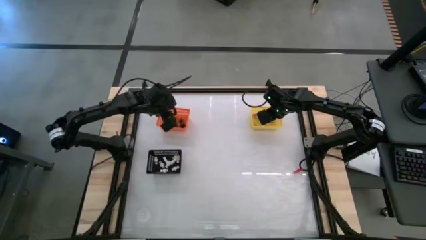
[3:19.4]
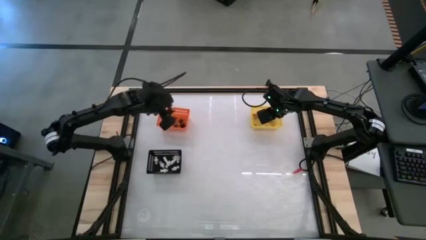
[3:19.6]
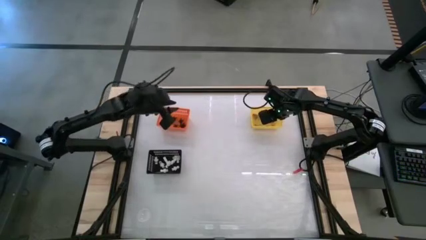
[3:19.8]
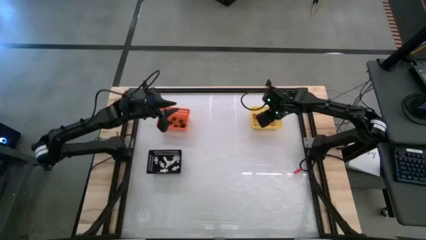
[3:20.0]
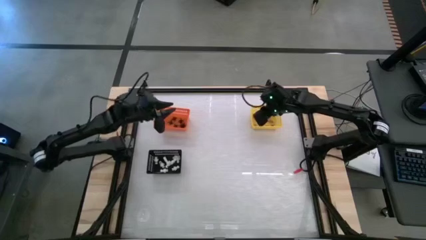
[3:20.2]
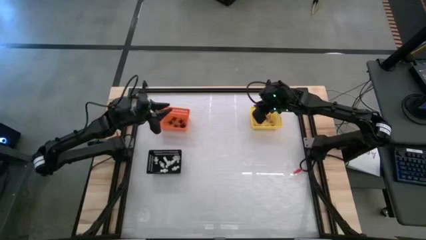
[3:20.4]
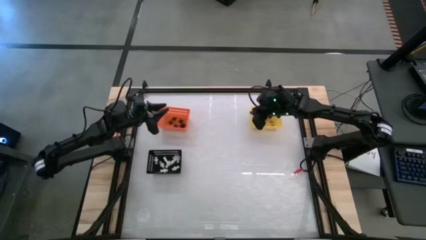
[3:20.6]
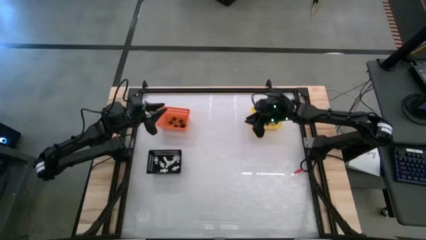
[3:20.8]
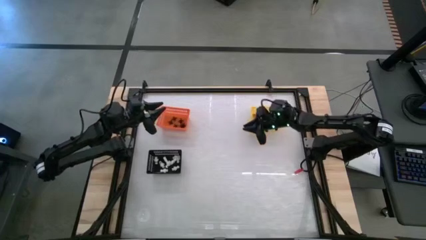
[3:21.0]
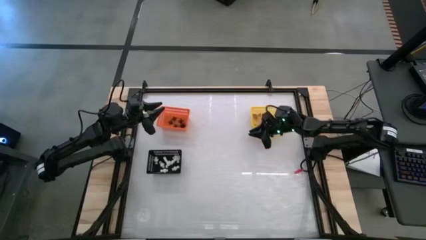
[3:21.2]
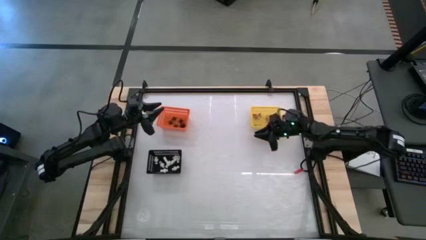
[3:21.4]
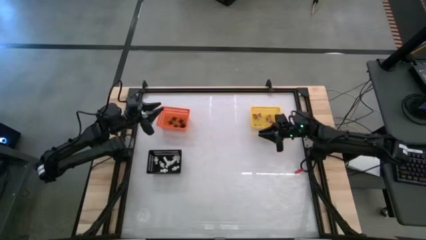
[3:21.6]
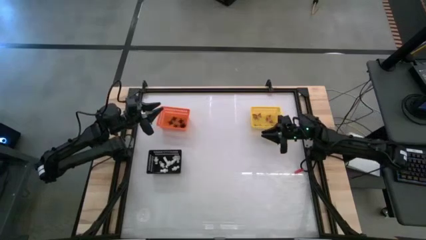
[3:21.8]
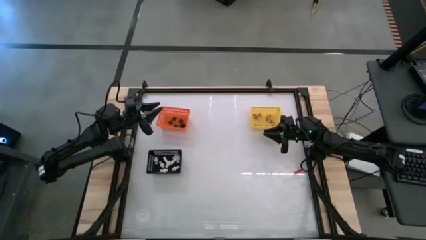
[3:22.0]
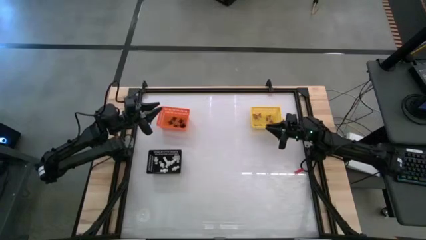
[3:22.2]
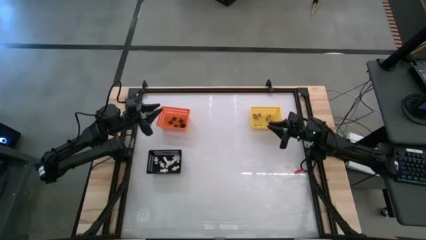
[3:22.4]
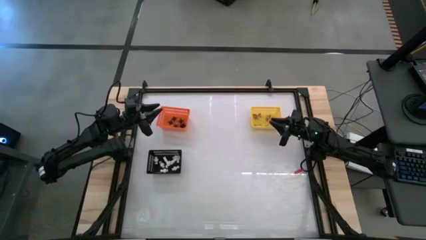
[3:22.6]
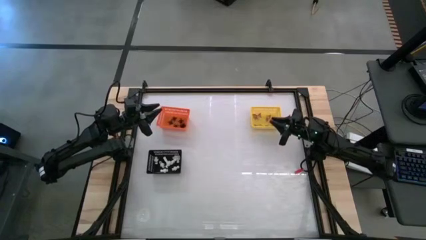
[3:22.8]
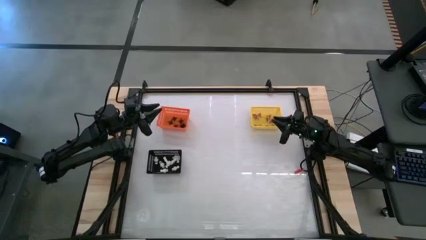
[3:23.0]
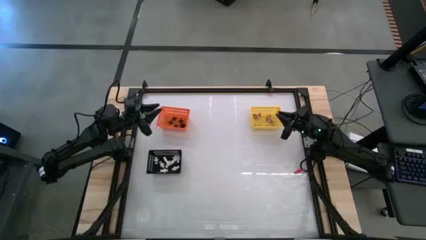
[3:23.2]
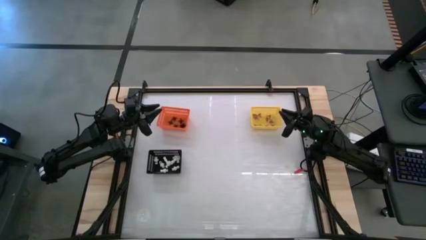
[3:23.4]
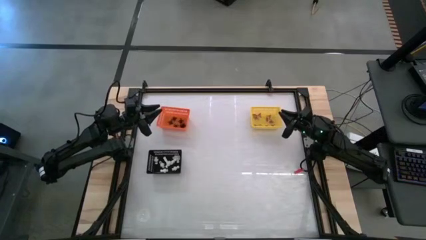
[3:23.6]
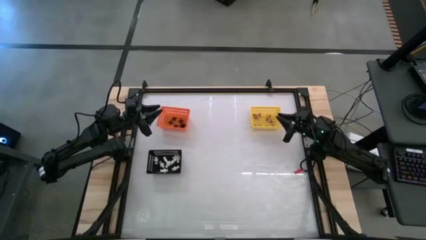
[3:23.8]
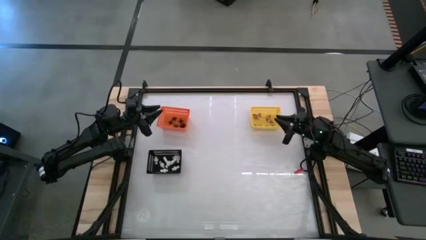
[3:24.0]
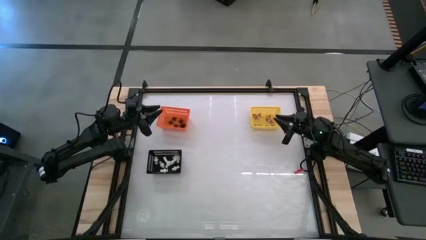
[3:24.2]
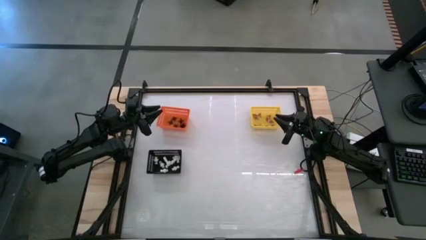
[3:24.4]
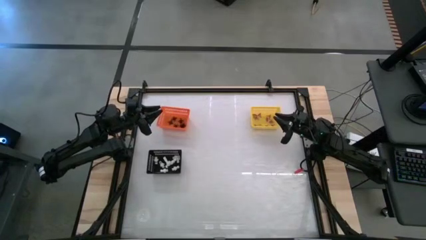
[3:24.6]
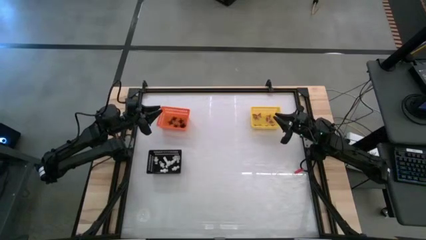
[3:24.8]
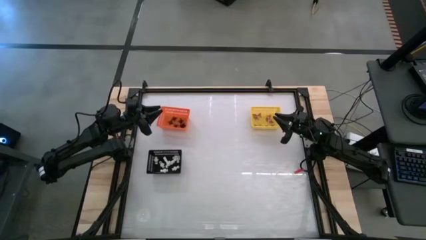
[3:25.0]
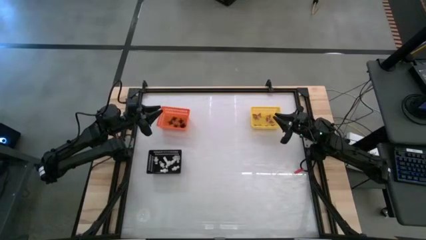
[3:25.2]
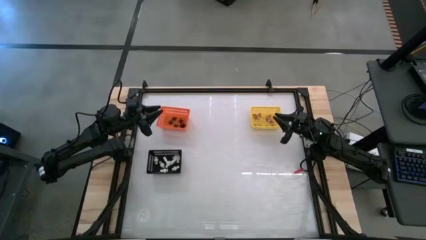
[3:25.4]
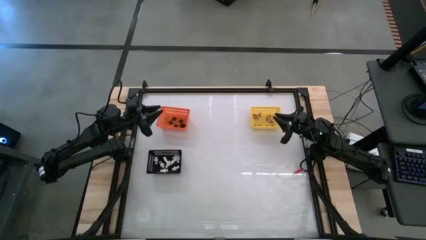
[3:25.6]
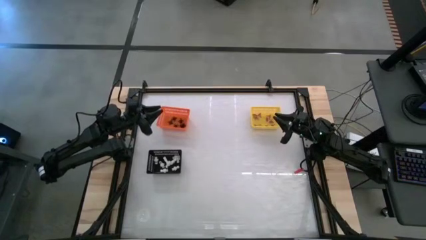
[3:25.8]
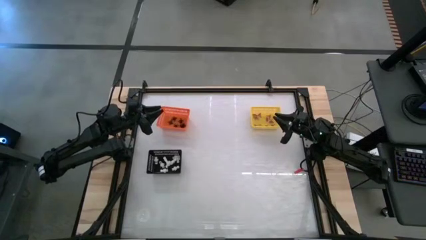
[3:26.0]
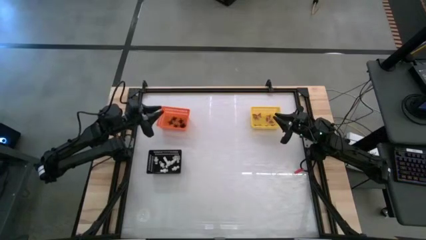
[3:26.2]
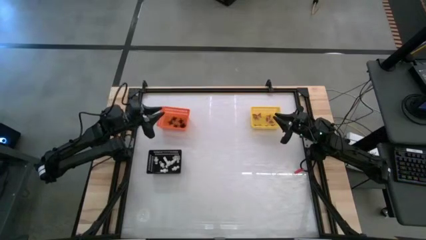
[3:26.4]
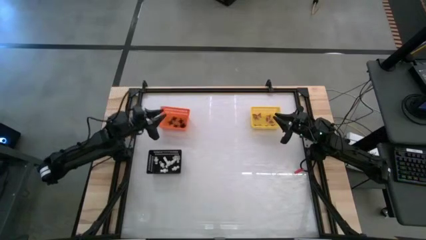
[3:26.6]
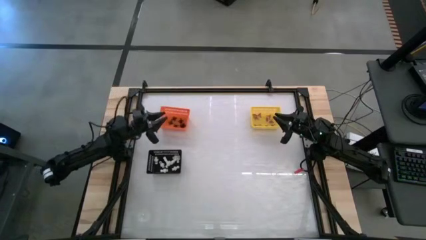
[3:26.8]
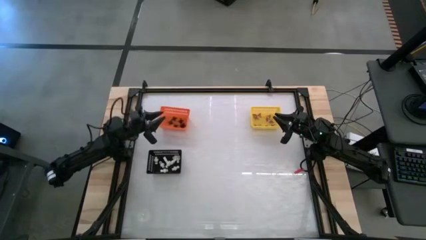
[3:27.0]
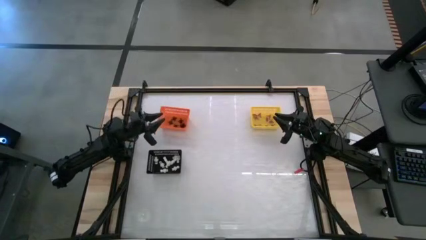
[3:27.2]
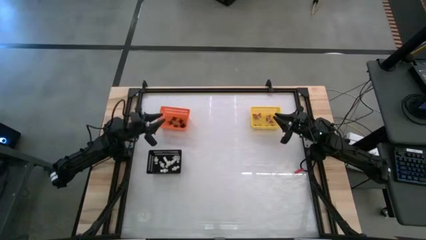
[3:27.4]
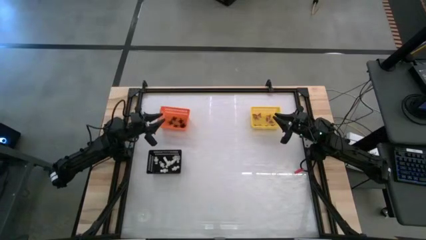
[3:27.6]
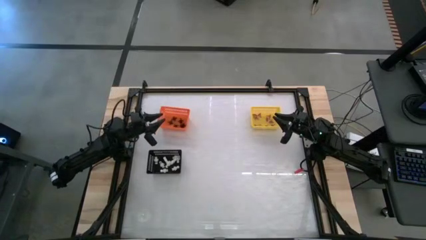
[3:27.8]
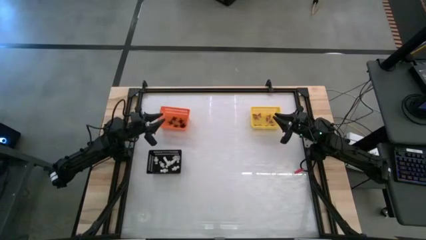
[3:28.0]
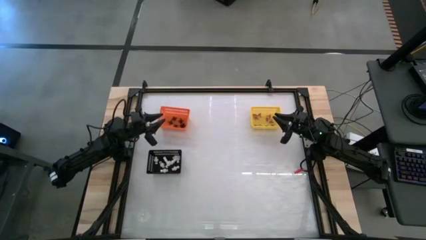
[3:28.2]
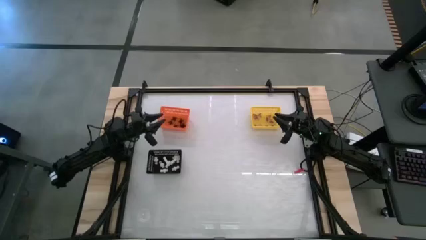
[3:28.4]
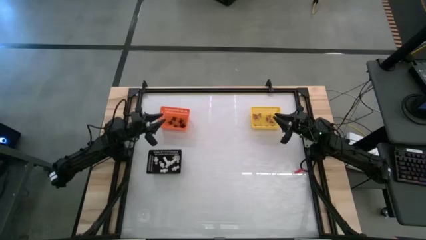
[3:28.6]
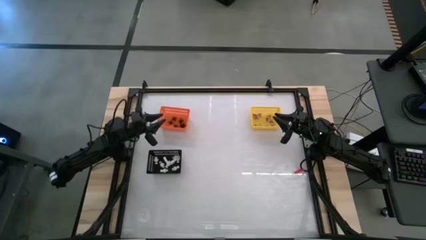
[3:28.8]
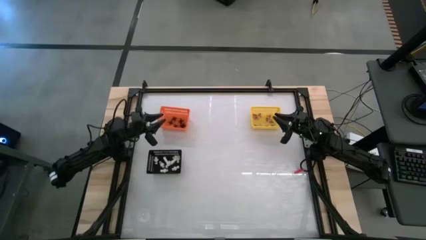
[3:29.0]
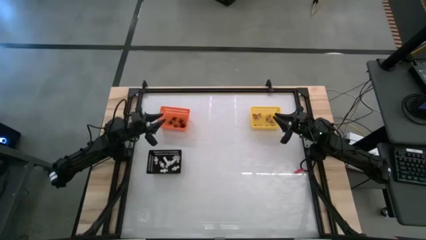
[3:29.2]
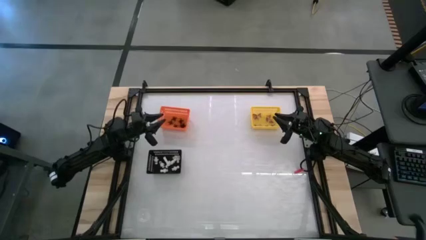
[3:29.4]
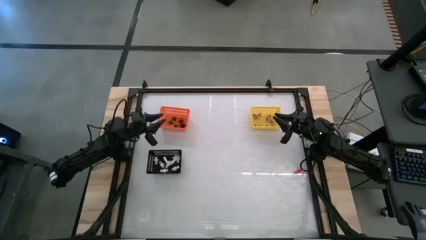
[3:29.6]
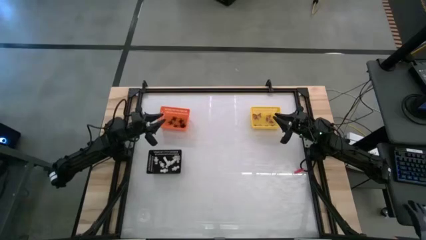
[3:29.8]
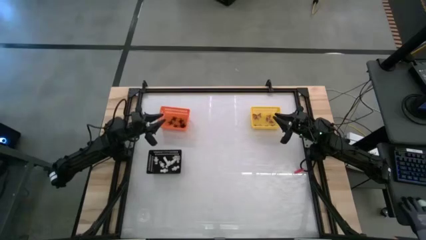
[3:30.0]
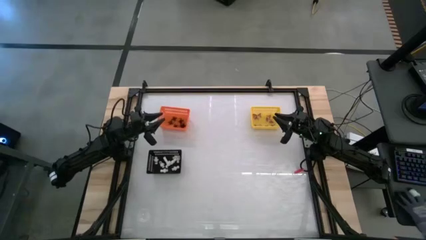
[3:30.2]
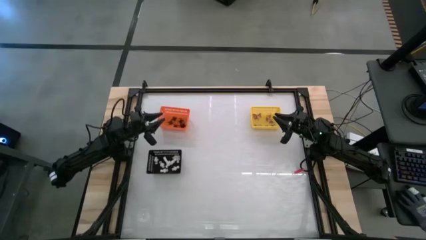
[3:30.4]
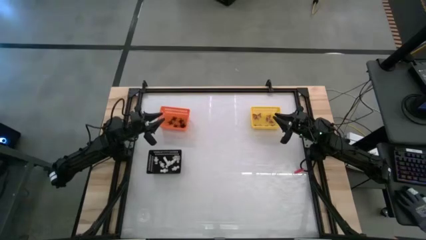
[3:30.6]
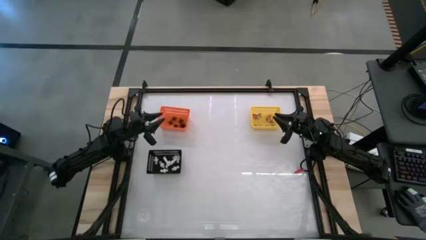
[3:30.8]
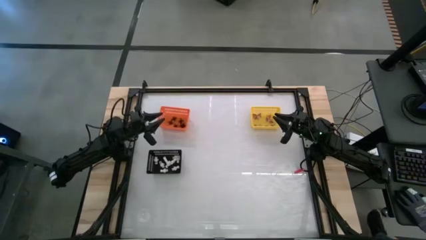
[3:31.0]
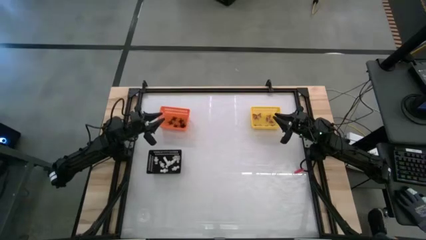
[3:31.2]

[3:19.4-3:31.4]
Task: Sort Halloween decoration
Return to Home Position

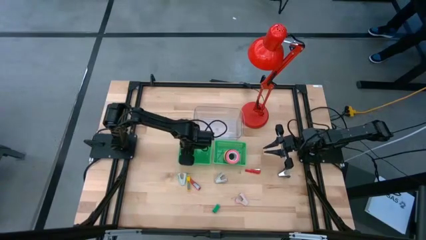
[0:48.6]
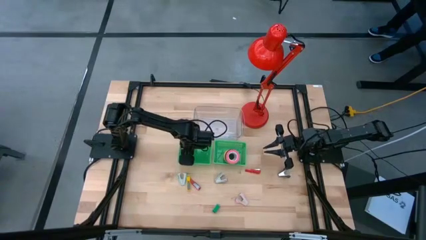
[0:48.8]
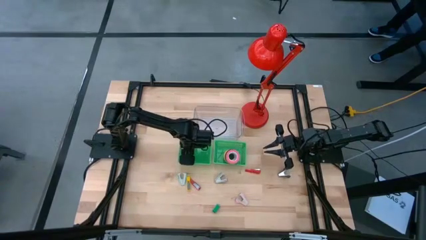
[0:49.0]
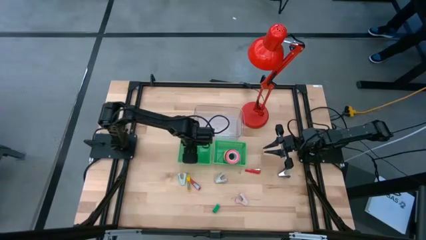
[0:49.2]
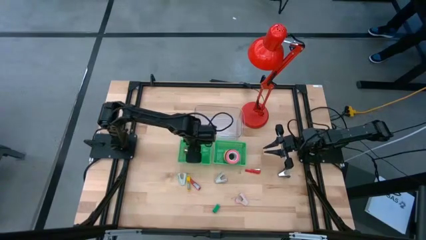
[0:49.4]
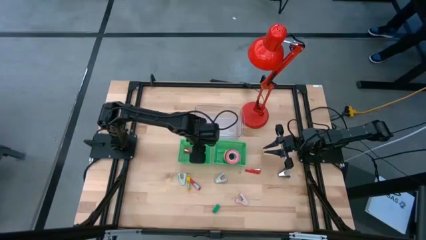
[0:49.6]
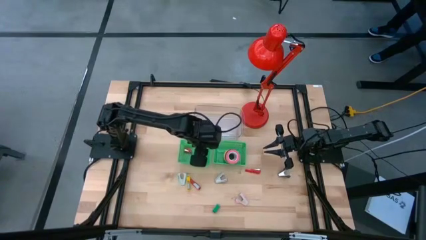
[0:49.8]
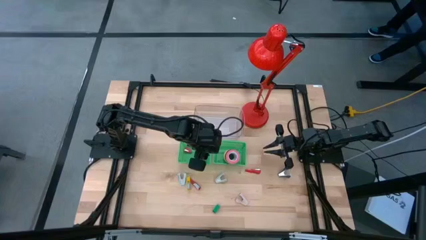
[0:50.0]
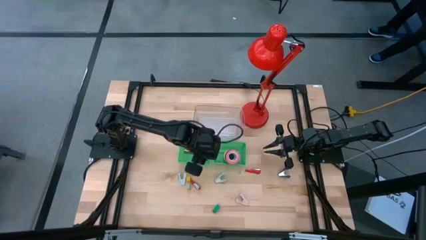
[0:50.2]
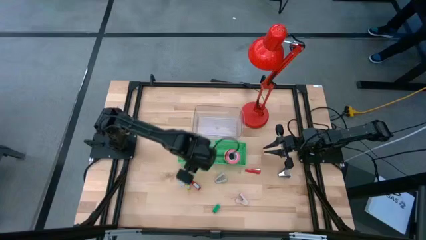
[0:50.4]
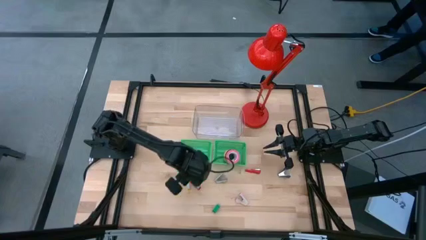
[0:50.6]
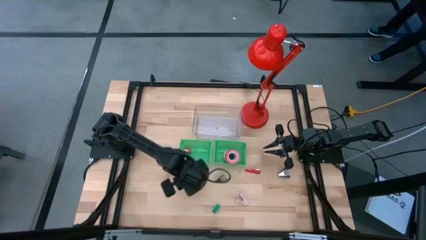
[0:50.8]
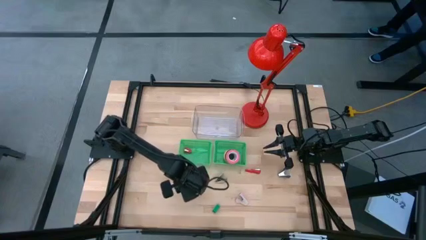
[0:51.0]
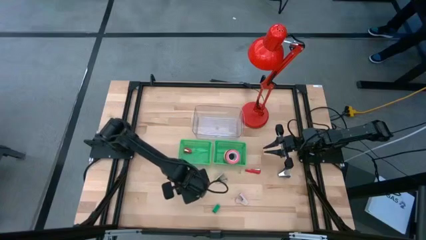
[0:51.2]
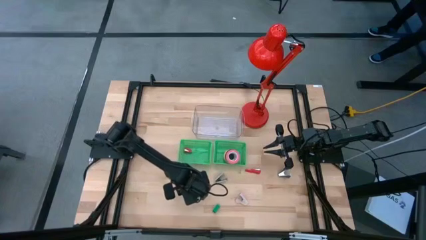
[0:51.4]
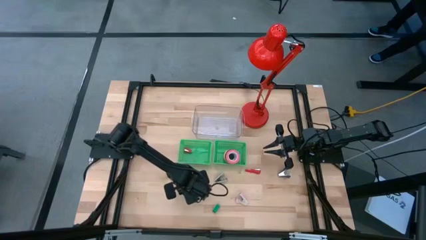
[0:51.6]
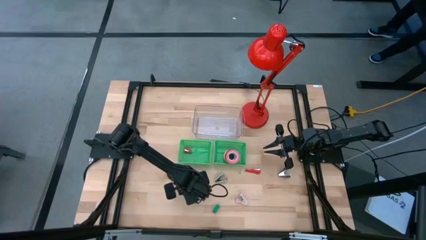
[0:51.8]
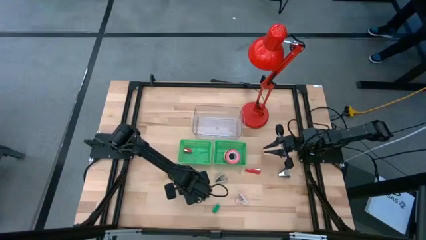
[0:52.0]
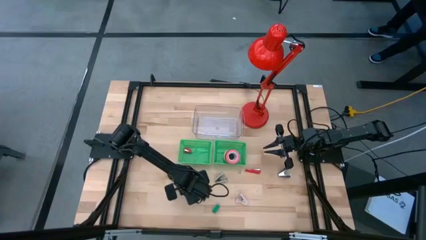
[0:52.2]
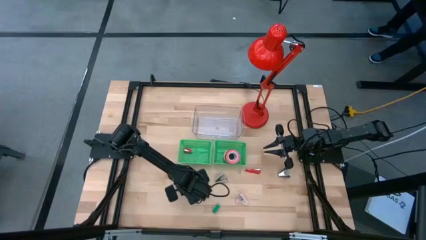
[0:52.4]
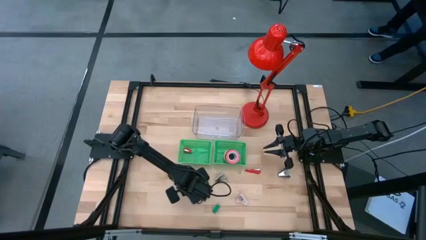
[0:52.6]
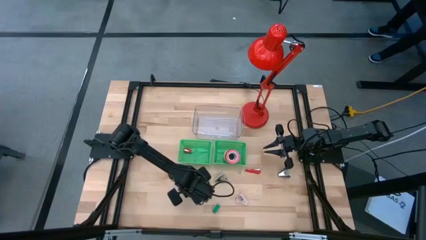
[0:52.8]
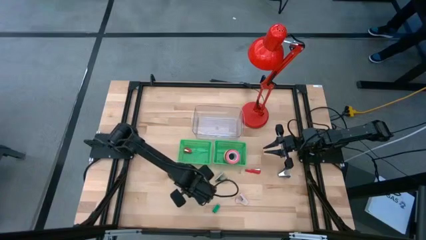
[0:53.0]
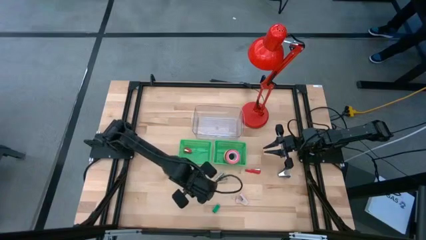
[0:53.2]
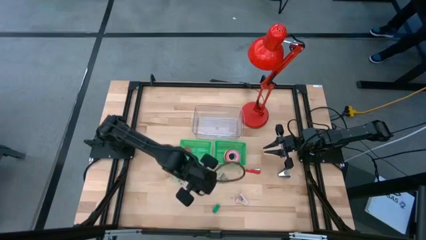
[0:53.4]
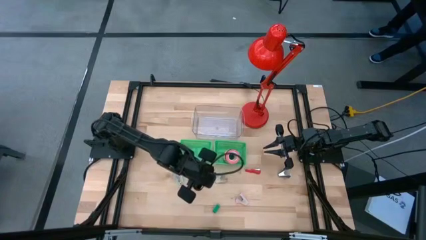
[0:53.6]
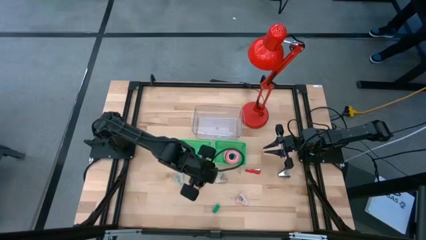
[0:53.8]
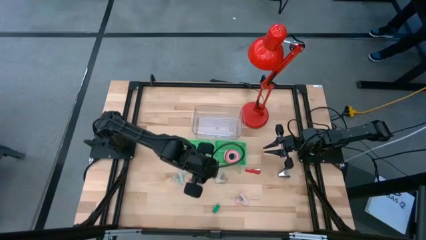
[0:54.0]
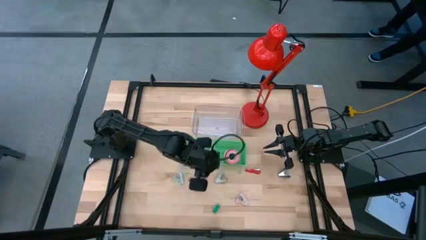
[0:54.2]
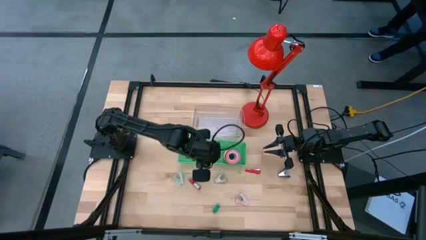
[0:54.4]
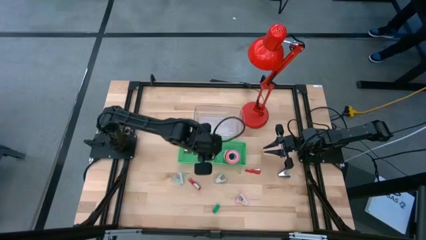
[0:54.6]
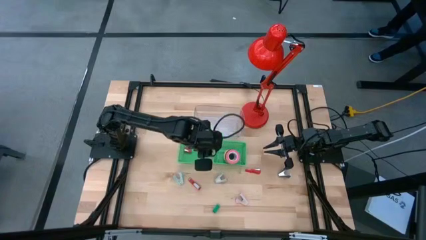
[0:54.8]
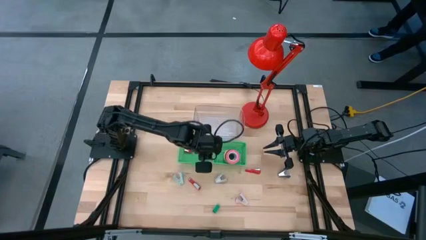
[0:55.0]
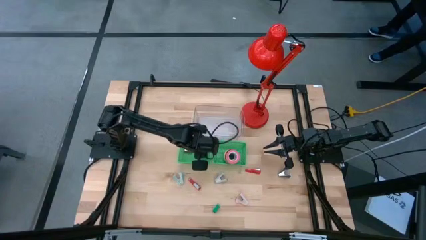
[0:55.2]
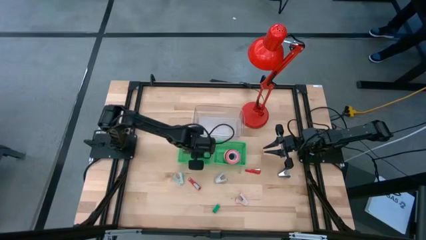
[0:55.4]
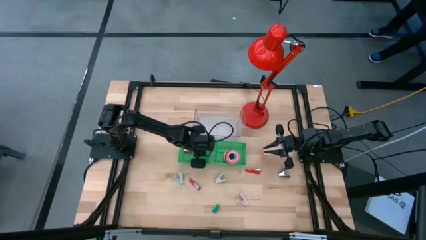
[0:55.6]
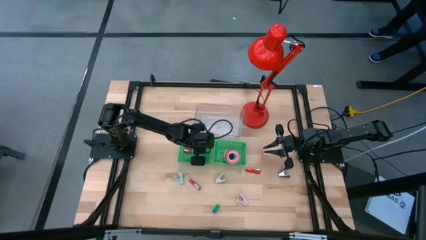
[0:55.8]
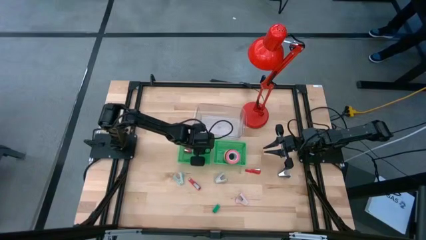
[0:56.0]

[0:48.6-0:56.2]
Task: Pick and place Stapler, Stapler remover, tape
Put the yellow stapler into the left green bin
